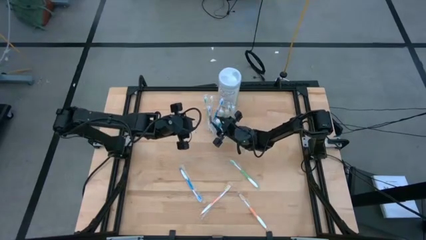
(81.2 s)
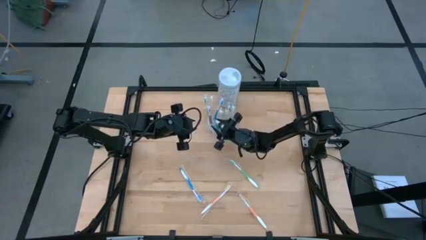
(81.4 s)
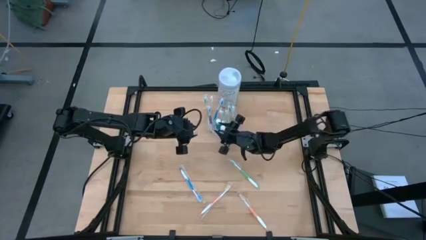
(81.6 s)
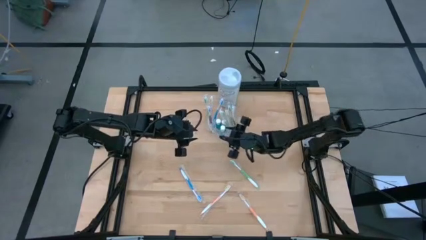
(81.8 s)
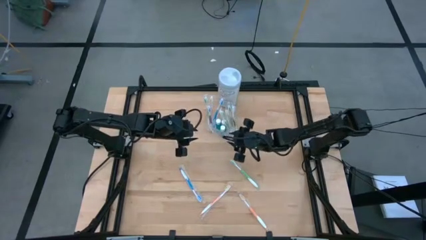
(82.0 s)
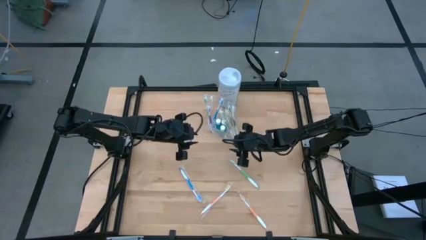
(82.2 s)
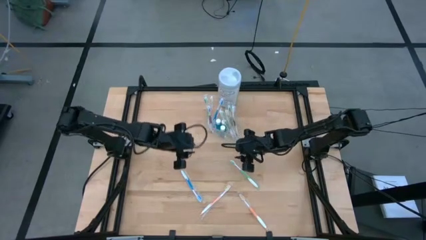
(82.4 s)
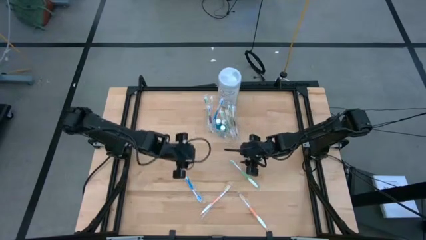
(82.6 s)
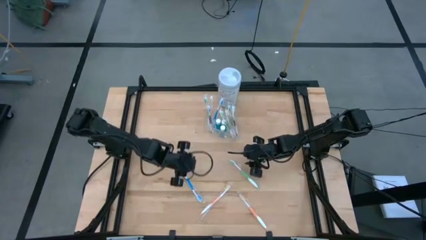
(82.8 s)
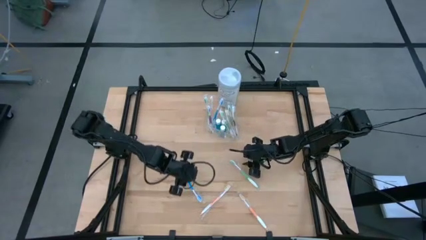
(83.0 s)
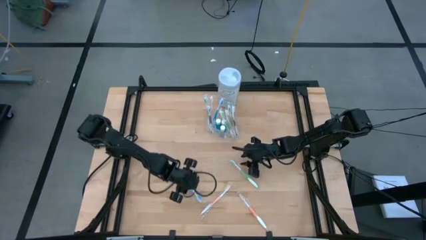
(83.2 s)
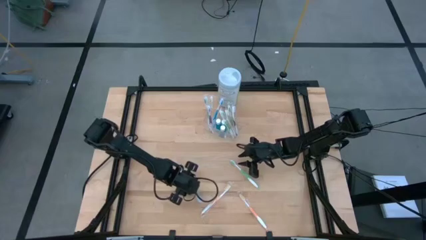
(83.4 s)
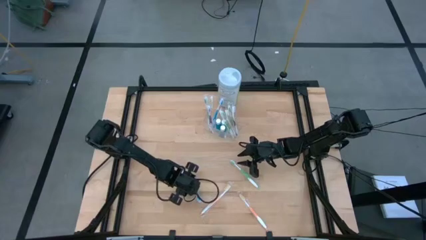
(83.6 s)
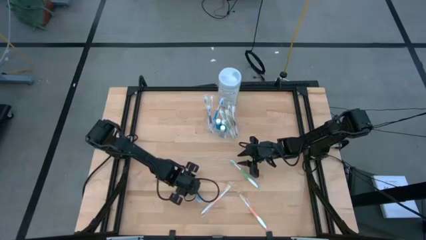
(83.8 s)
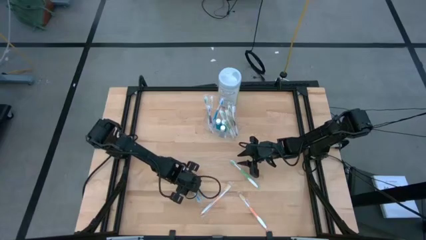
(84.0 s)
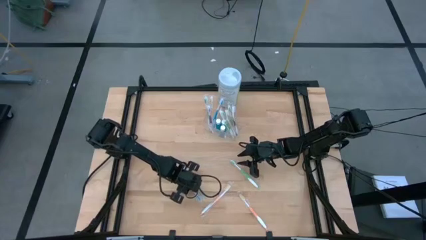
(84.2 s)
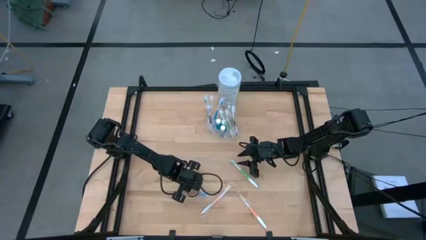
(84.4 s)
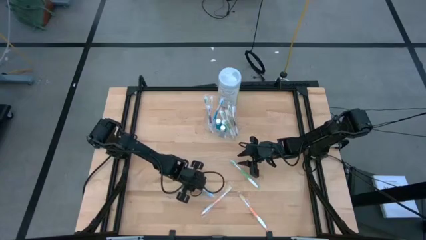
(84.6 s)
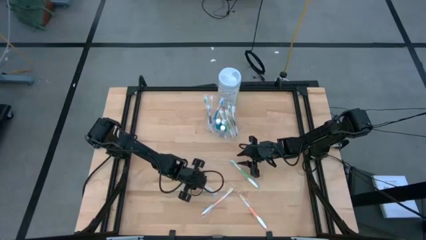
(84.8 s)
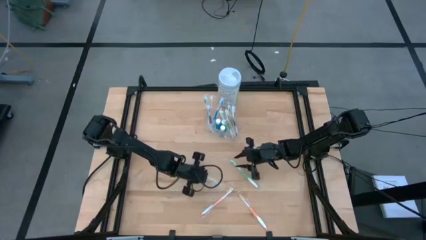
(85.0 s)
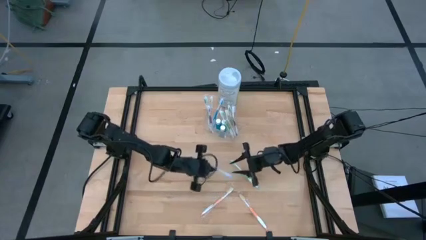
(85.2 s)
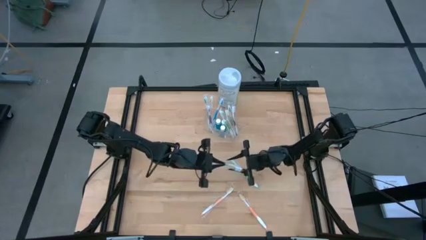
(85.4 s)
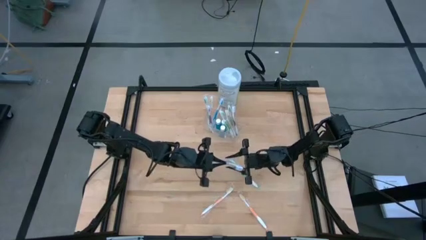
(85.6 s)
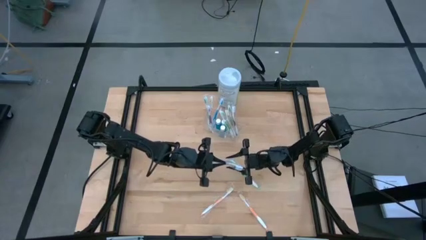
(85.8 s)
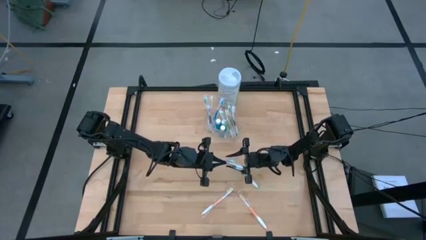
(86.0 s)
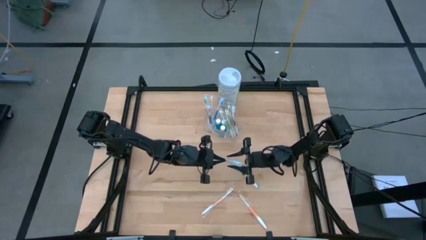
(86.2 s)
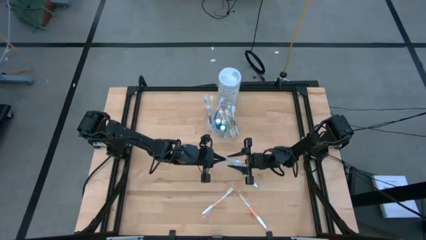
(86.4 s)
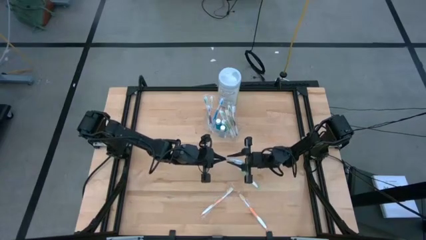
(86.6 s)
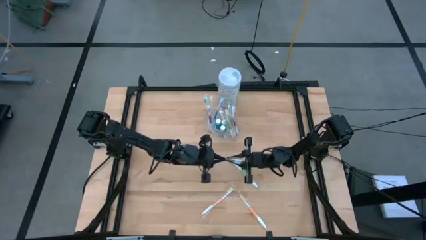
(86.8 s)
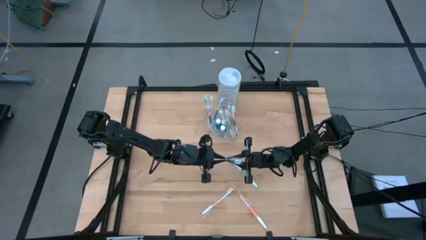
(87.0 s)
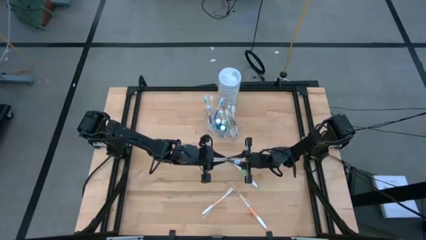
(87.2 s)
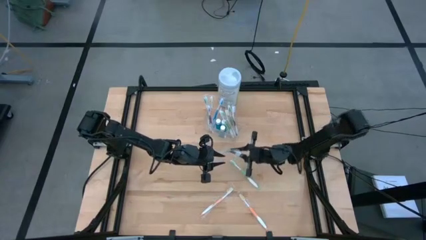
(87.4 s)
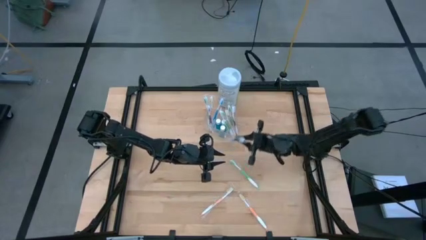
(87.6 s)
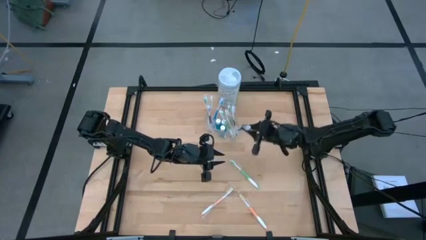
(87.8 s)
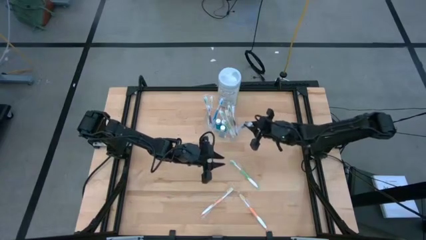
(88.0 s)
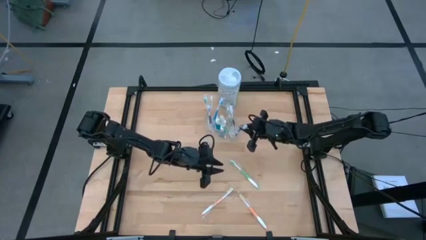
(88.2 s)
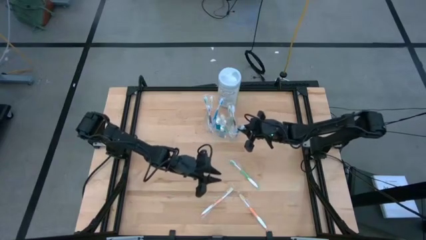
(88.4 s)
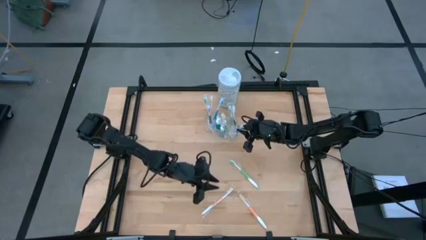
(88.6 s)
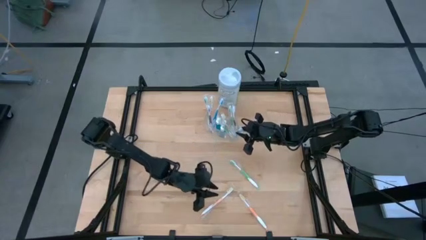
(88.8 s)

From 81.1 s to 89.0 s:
Task: Pick & Place toothbrushing station
Put the blue toothbrush into the transparent organizer

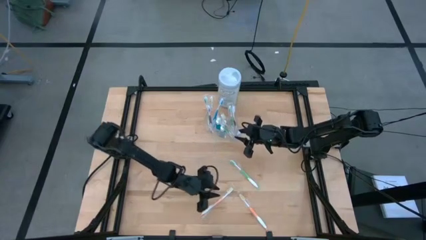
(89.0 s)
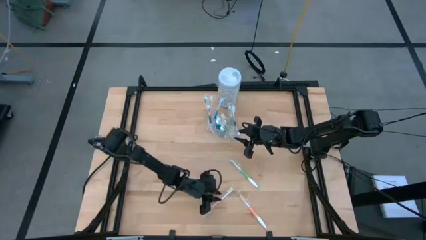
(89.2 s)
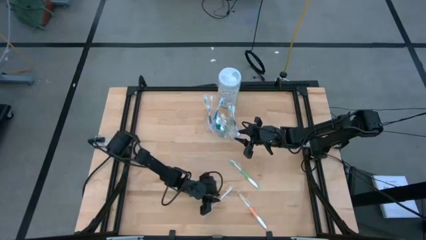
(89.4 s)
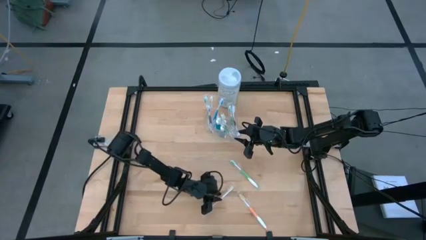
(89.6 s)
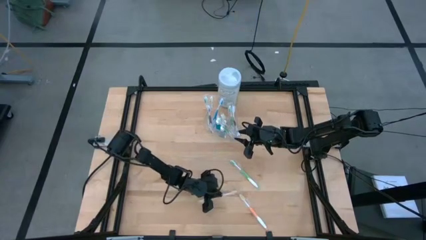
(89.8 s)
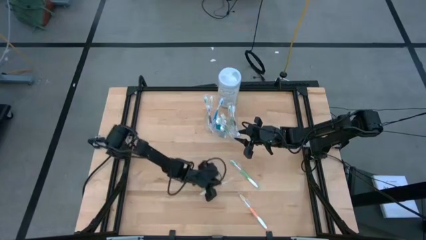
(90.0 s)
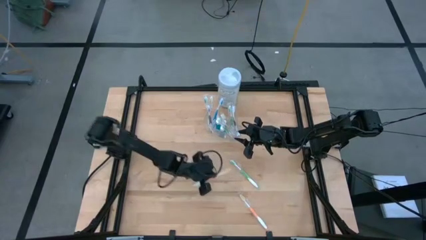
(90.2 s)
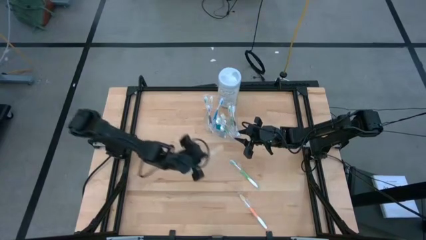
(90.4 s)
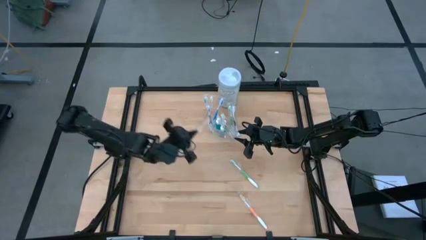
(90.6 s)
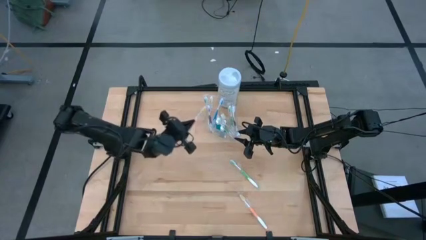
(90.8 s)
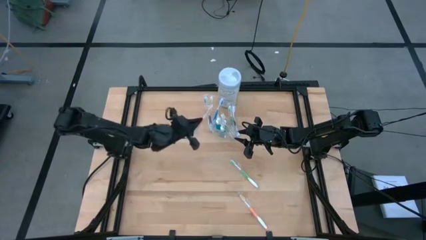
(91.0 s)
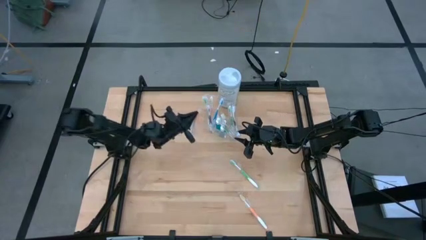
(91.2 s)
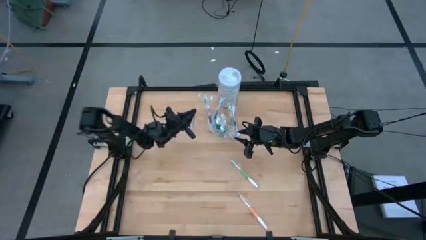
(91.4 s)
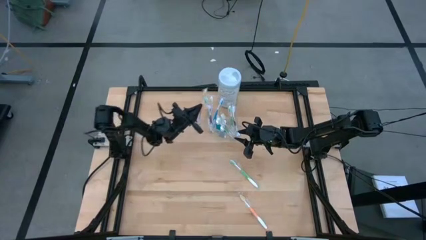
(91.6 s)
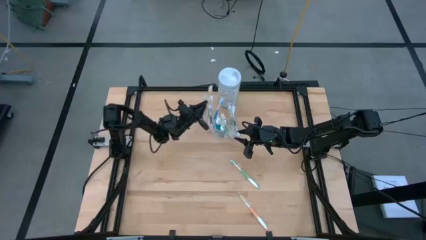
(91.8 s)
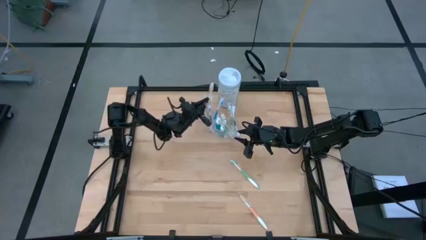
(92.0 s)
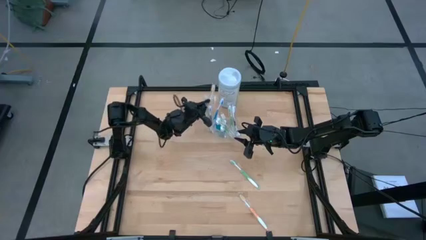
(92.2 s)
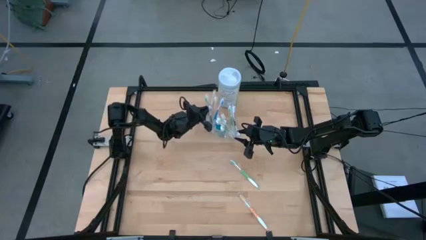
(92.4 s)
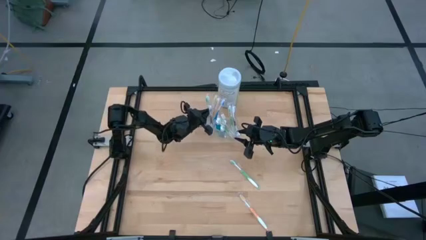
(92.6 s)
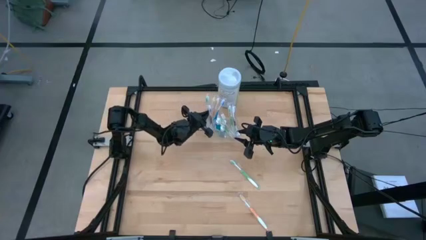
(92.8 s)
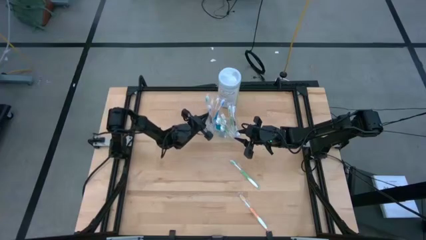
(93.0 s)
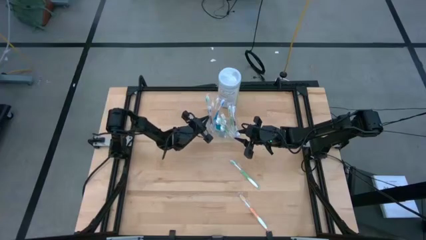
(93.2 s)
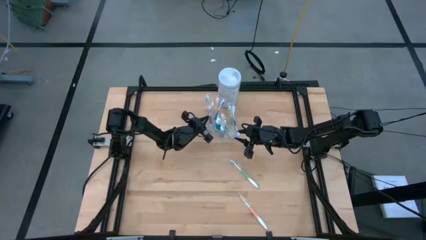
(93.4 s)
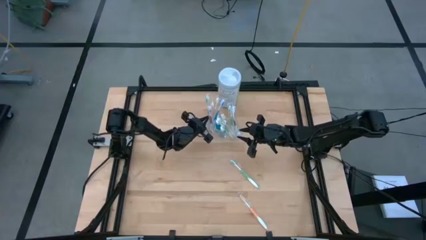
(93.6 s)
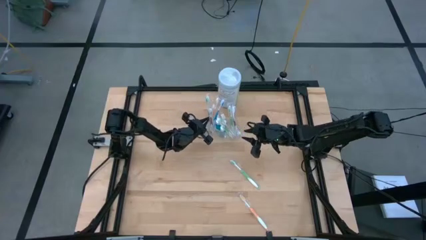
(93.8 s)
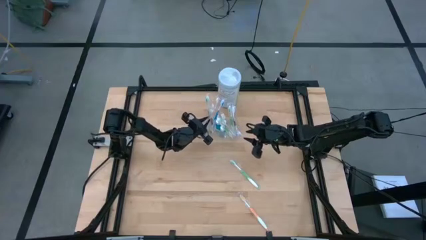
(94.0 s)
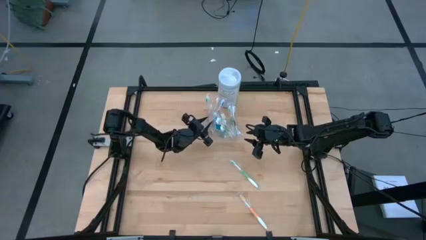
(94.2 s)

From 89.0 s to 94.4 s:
Put the orange toothbrush into the transparent organizer

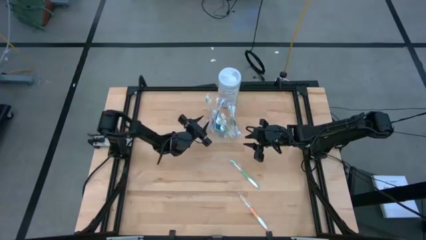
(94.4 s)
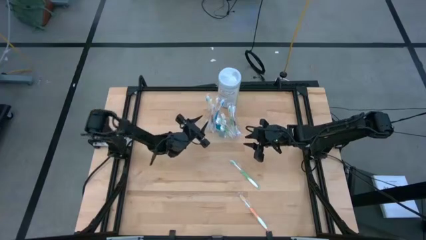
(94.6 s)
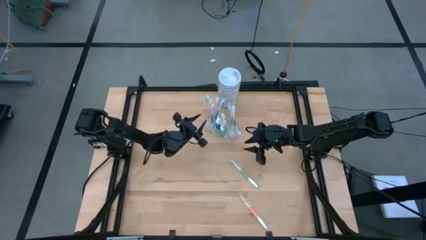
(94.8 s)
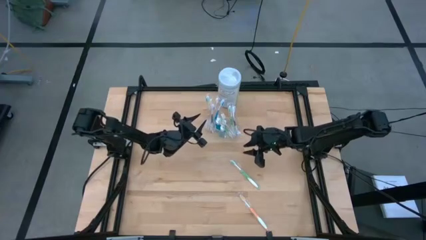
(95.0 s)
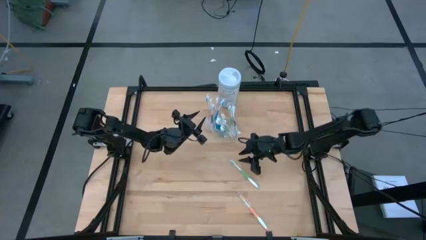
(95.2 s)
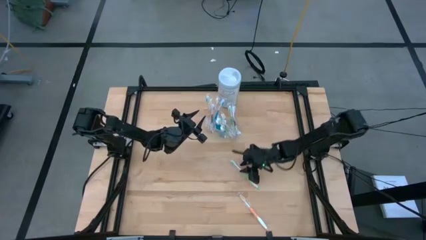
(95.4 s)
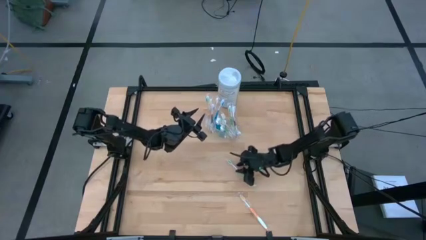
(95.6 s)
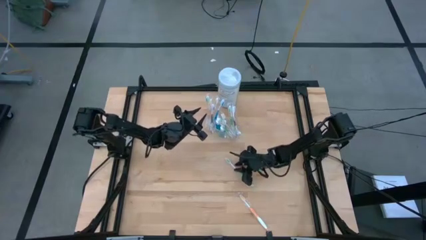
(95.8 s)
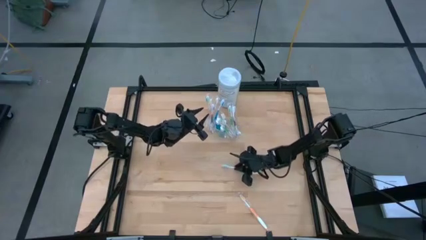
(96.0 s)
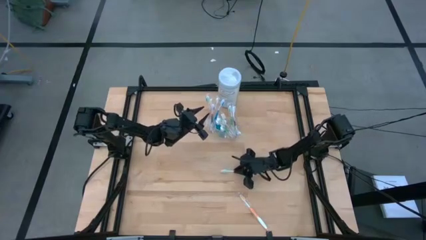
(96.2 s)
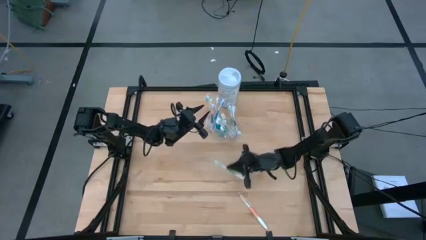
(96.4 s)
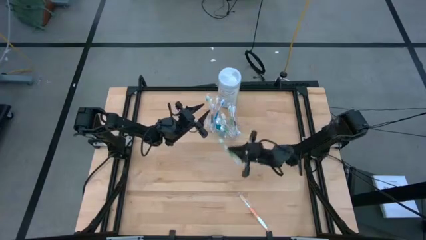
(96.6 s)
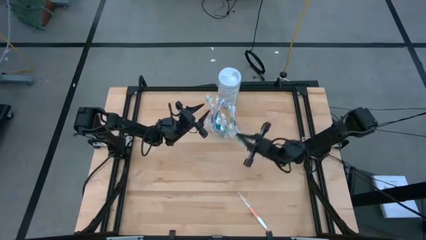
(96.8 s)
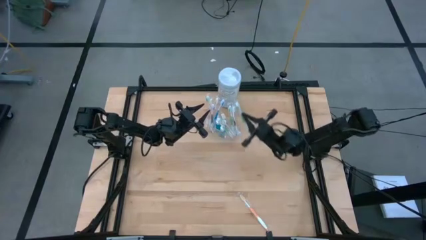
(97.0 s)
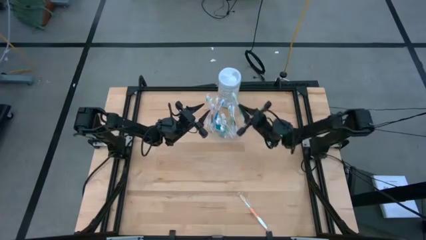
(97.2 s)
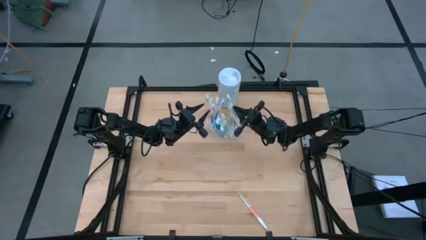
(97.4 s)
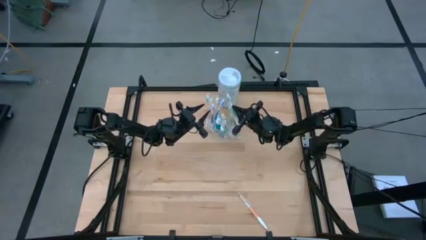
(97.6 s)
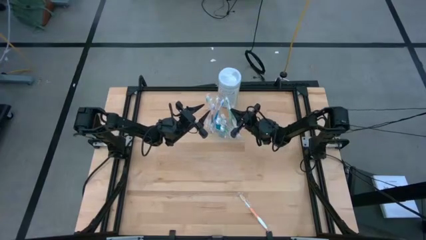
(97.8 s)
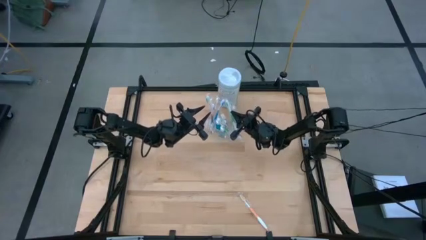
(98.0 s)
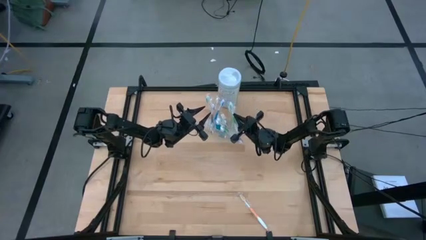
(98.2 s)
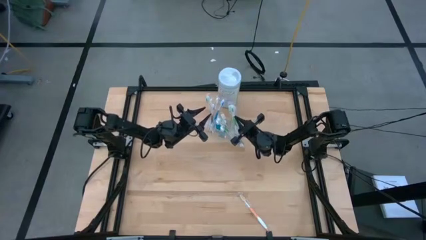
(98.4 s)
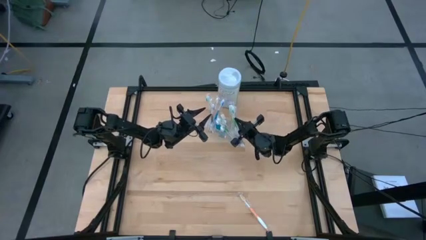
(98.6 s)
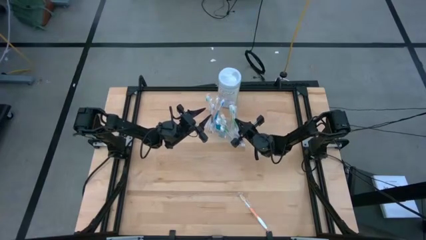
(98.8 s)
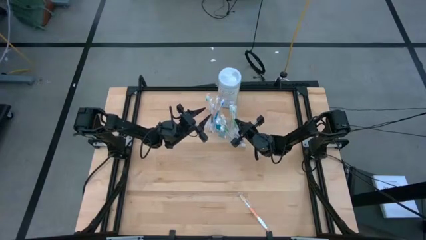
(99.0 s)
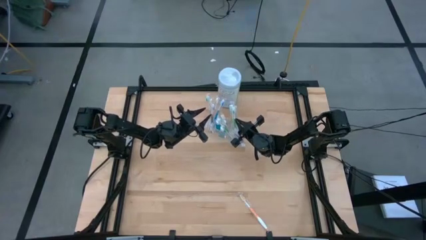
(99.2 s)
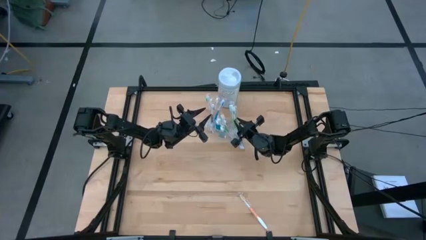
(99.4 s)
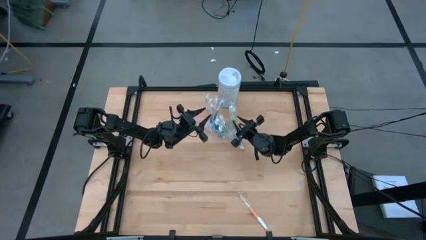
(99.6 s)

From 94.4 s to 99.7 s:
Put the green toothbrush into the transparent organizer
